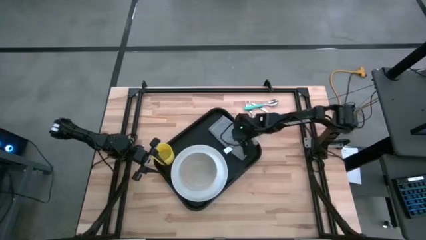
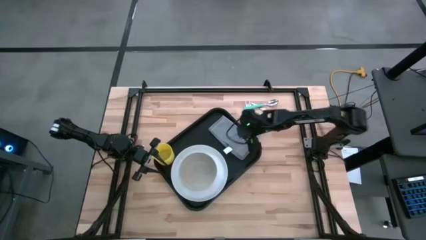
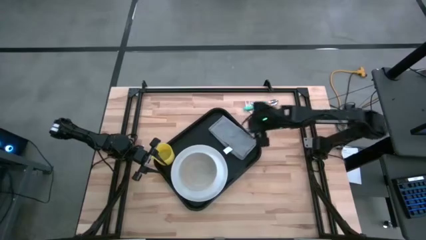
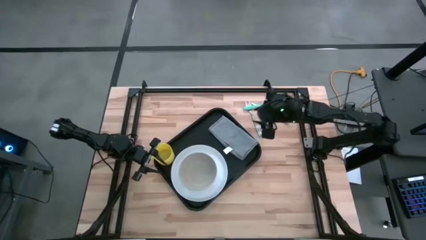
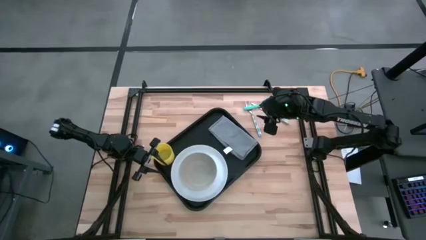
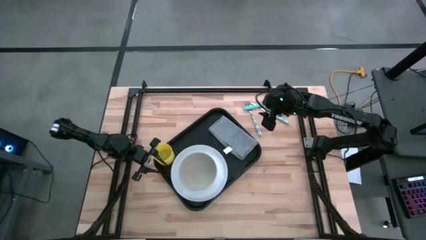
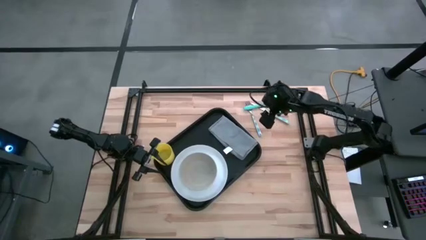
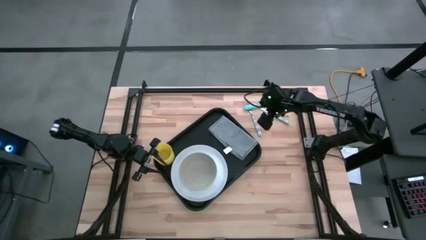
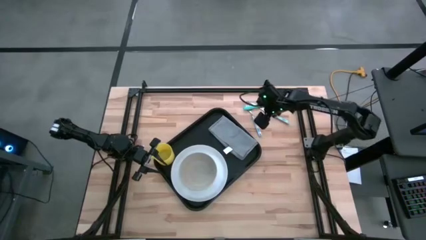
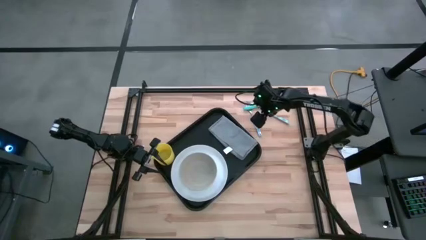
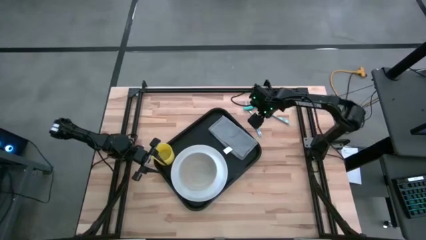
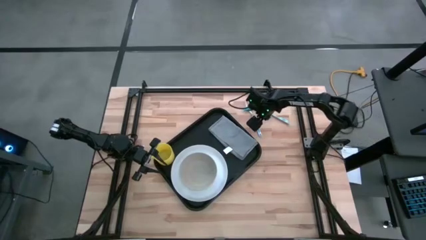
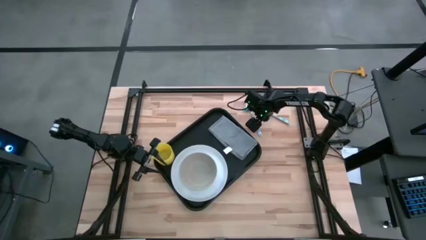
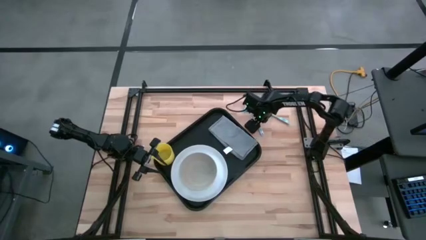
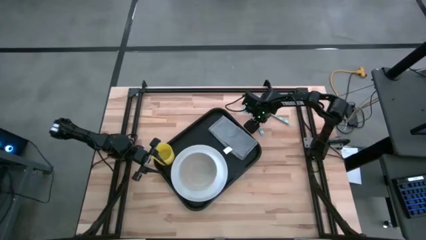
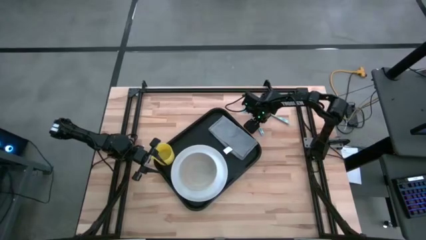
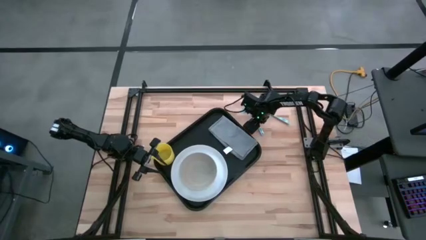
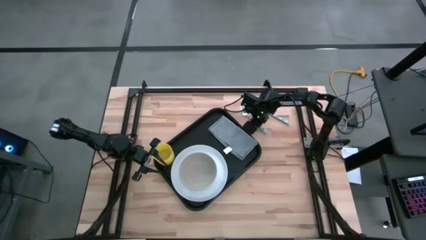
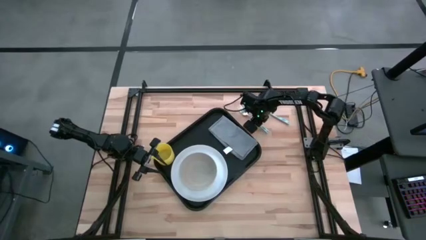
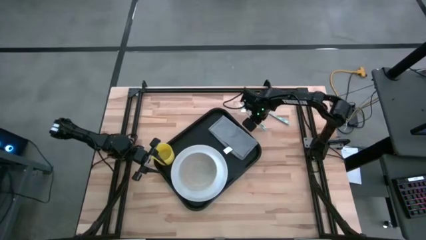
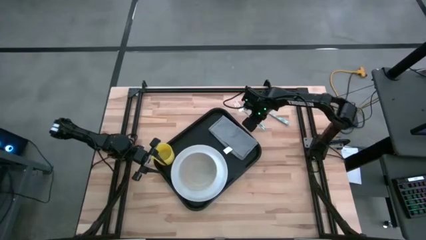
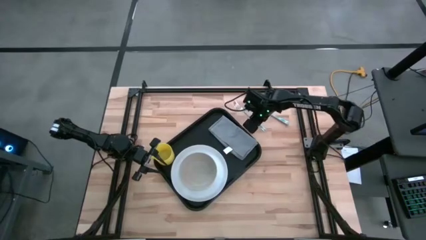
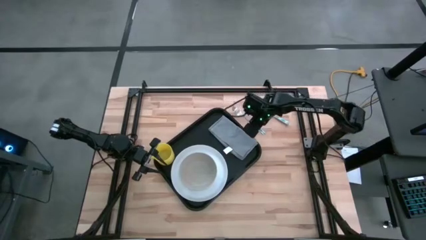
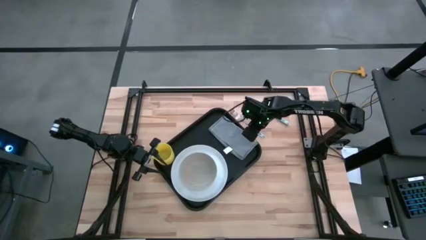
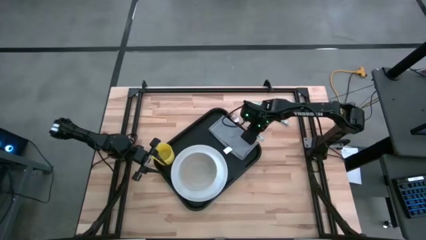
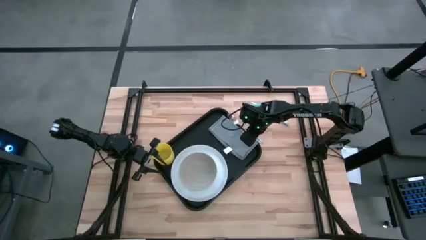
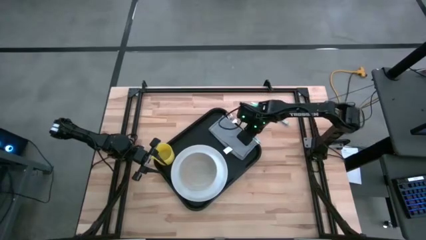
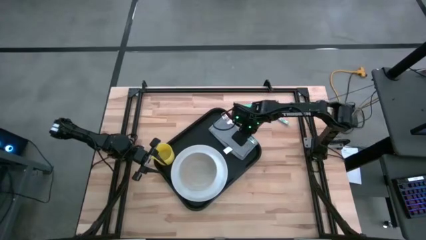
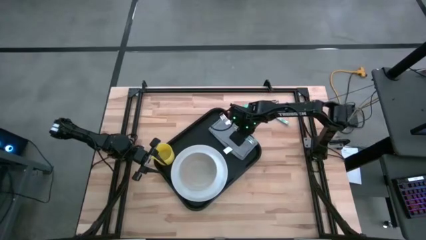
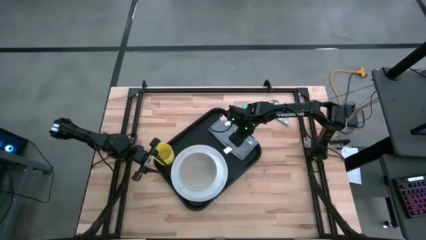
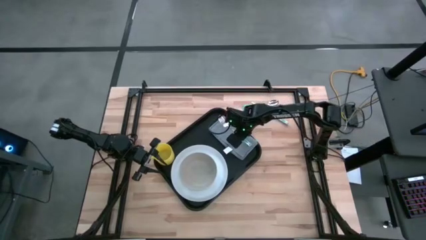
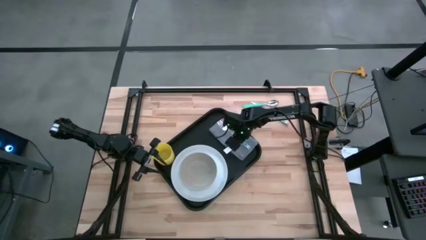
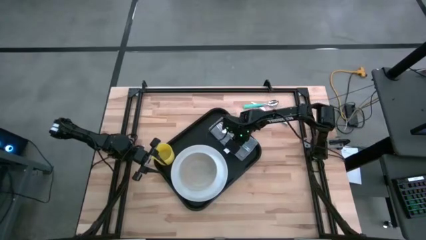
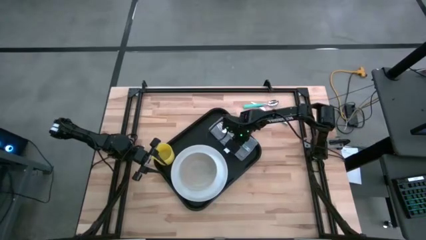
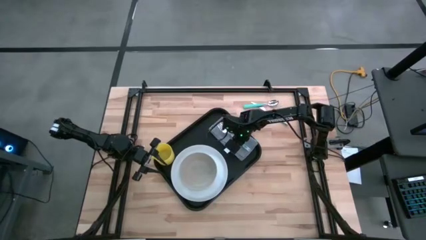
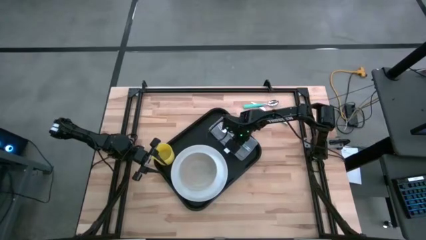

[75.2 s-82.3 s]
Task: Set up tray
Put the blue patterned fork on top of the gray napkin on the black tray

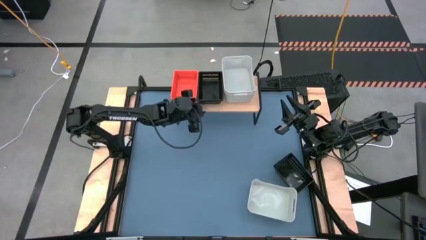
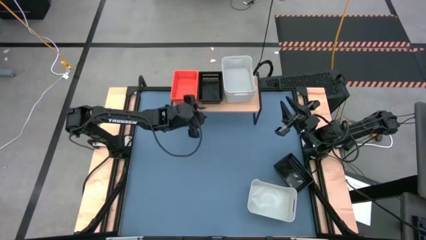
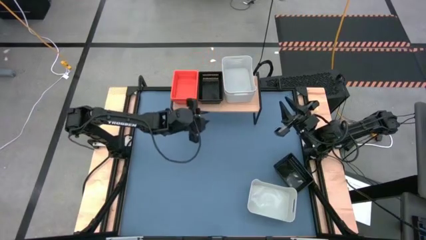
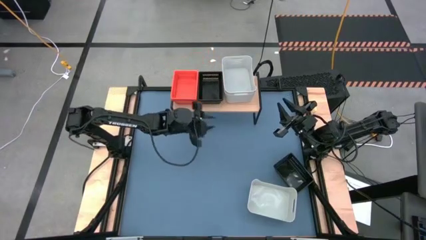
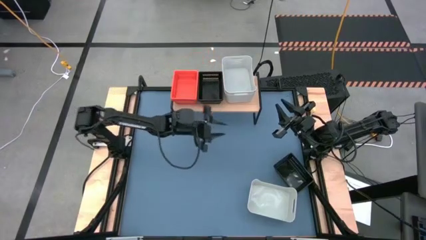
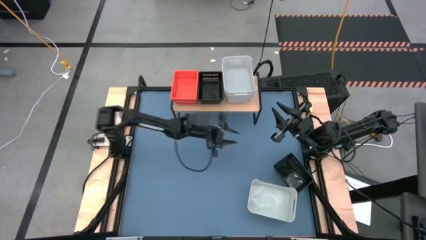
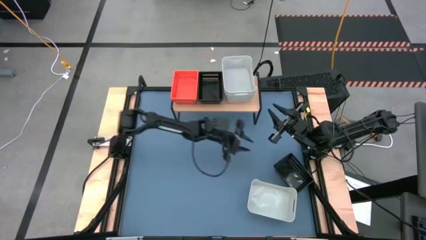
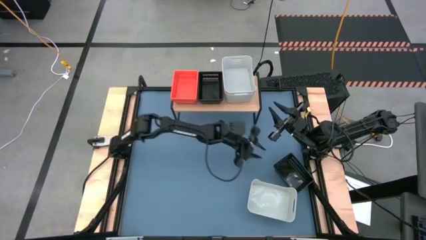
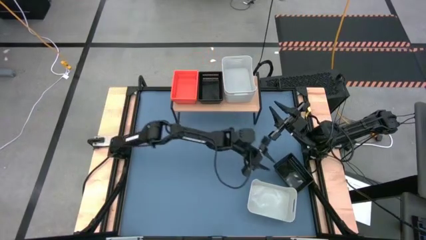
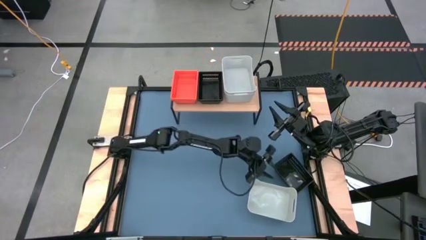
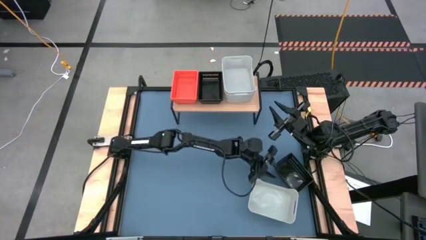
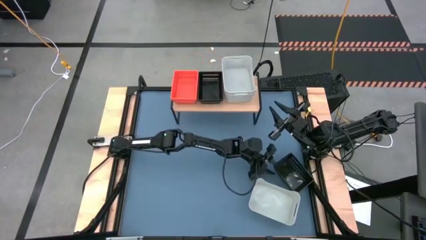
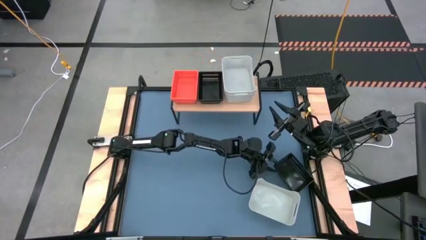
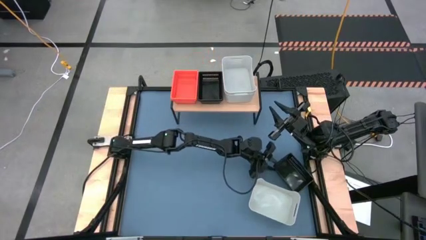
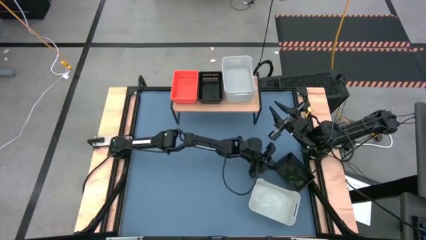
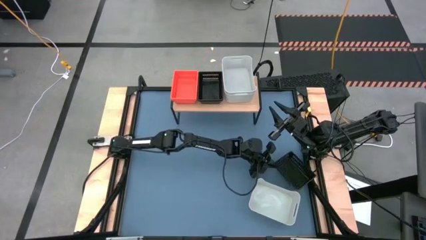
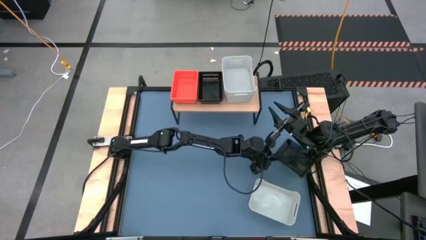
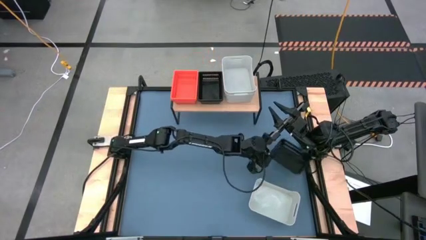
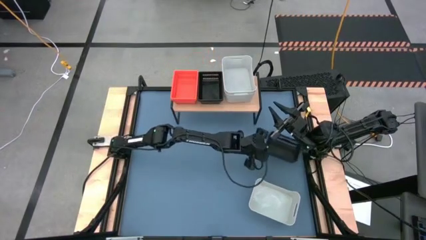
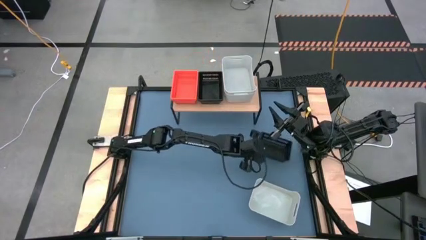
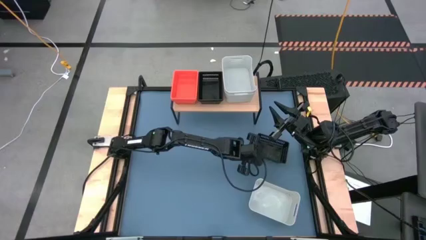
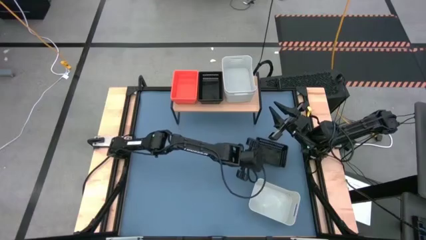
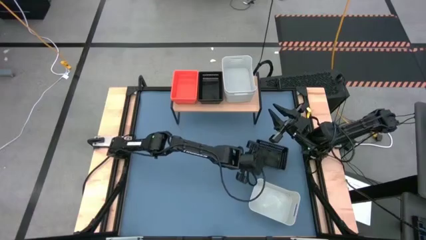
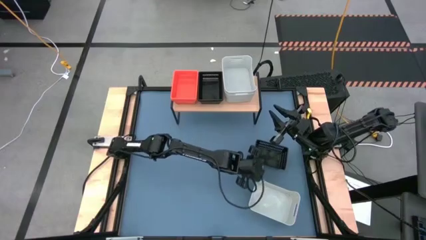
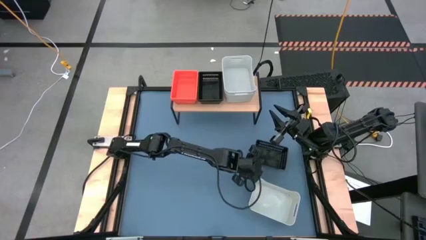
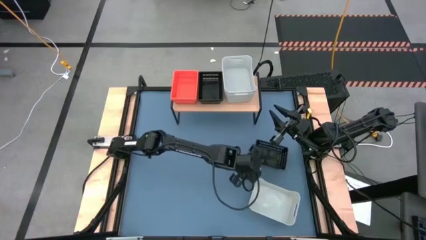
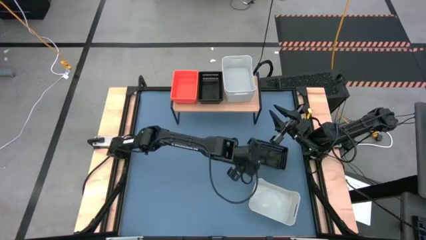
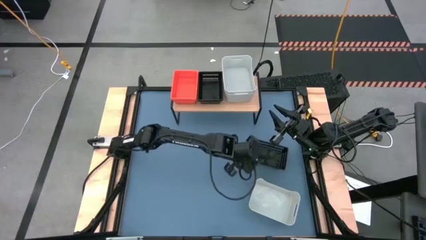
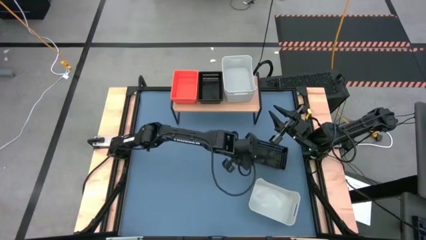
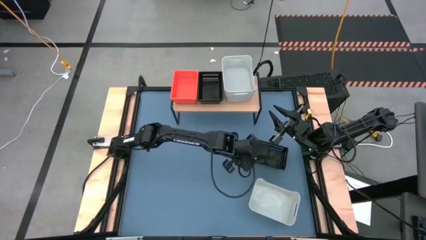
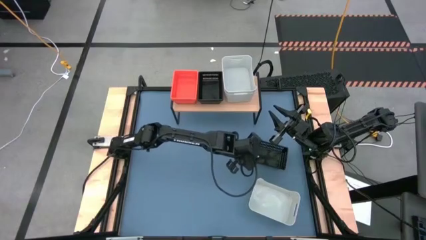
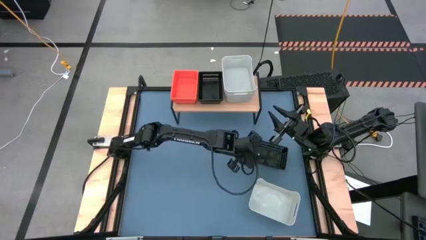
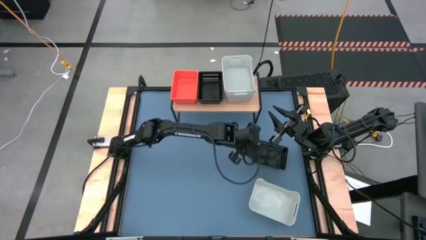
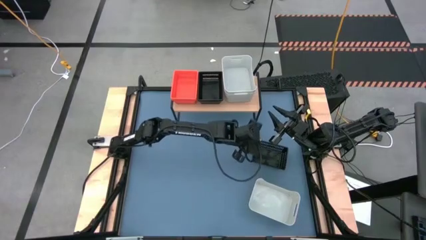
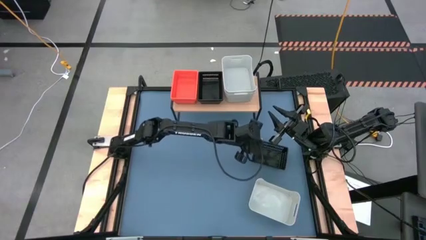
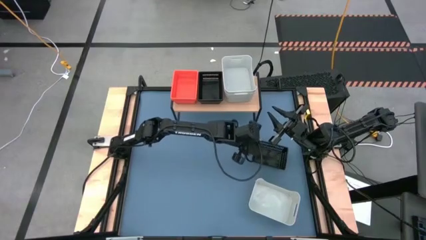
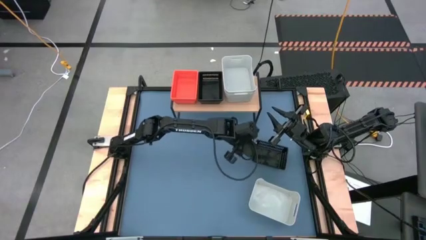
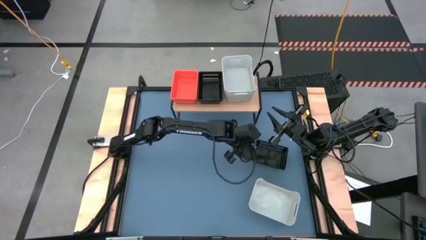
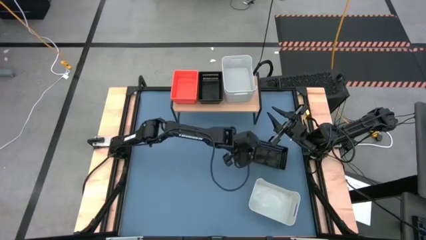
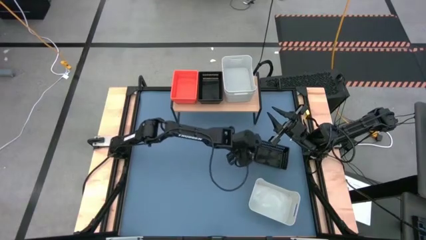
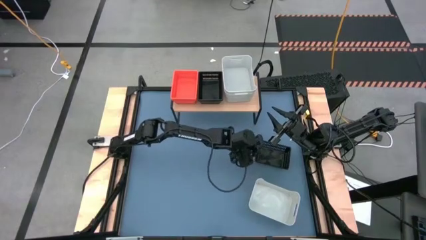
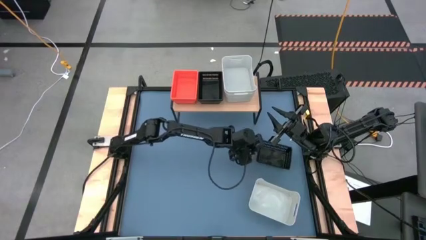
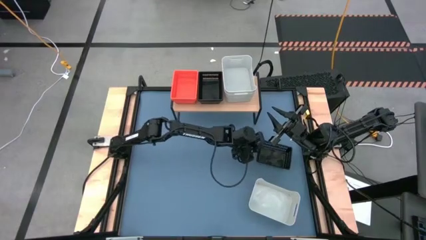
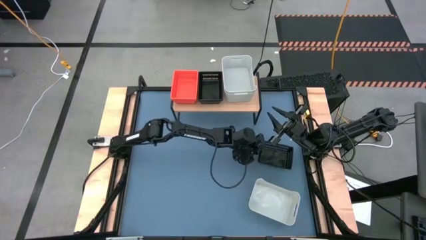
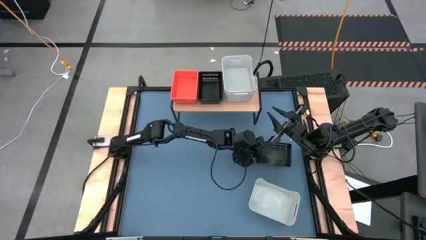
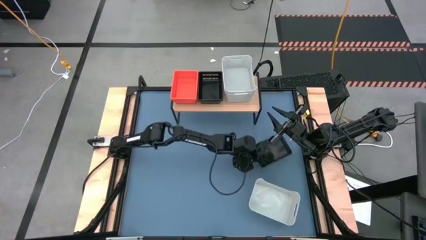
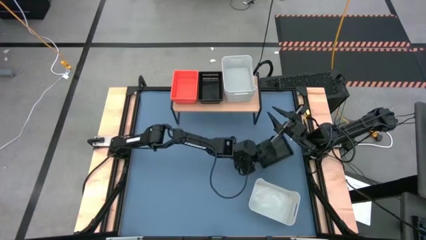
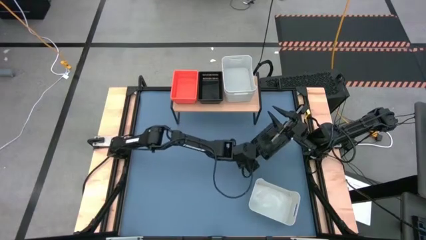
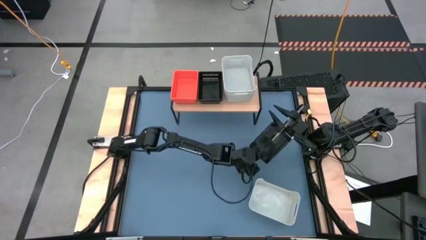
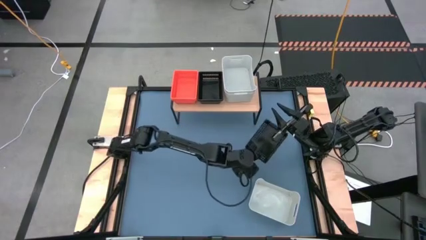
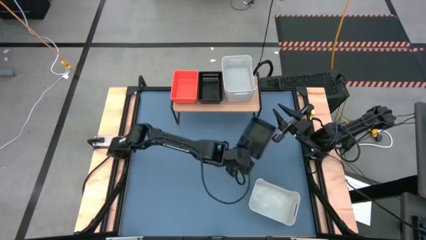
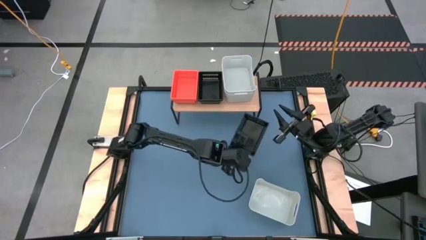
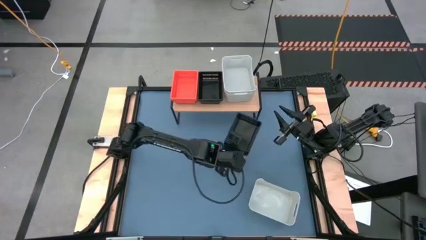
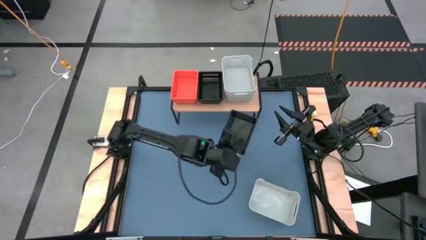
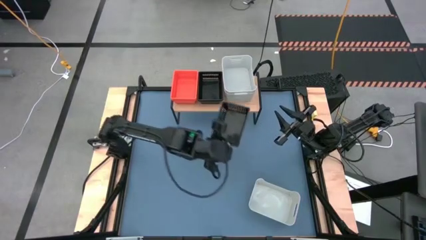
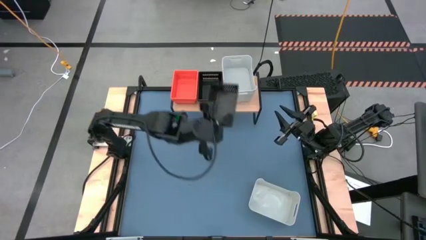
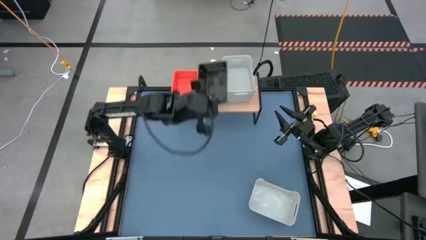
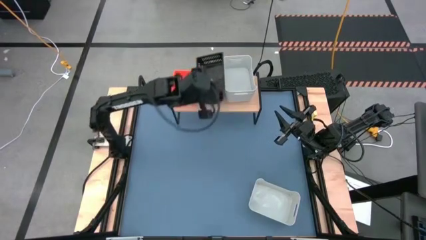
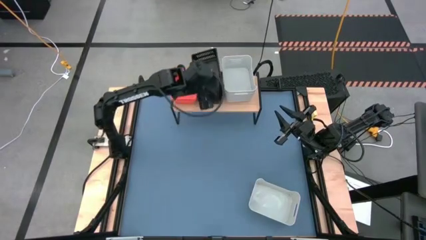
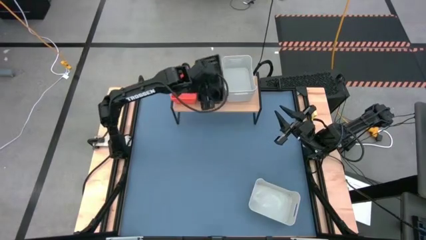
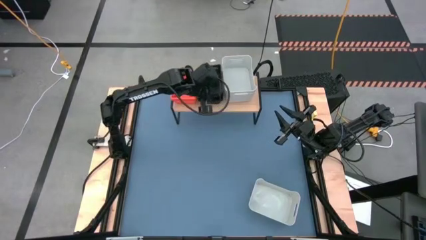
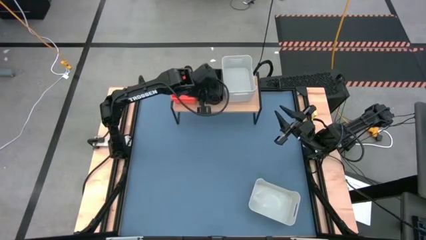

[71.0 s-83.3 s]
Task: Stack baskets on shelf by color
Stack the black bin on top of the other black bins on the shelf
